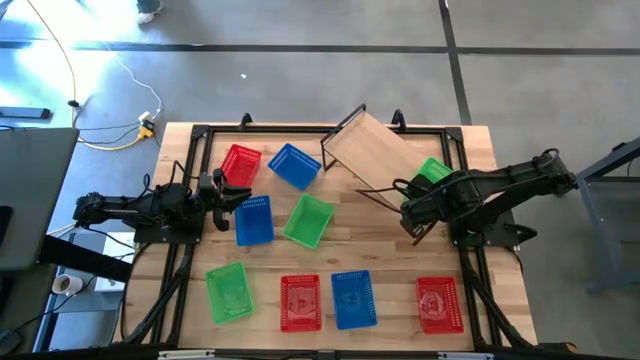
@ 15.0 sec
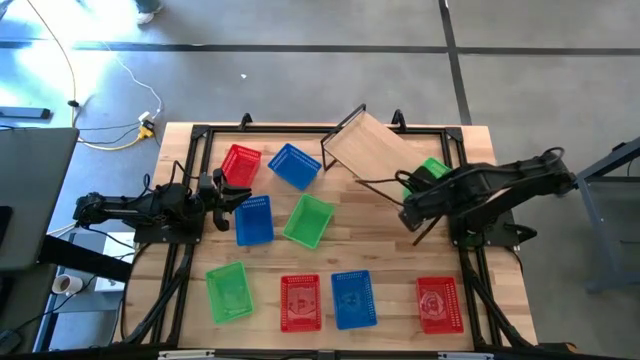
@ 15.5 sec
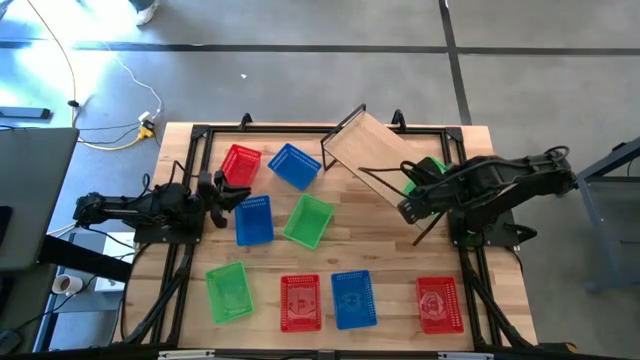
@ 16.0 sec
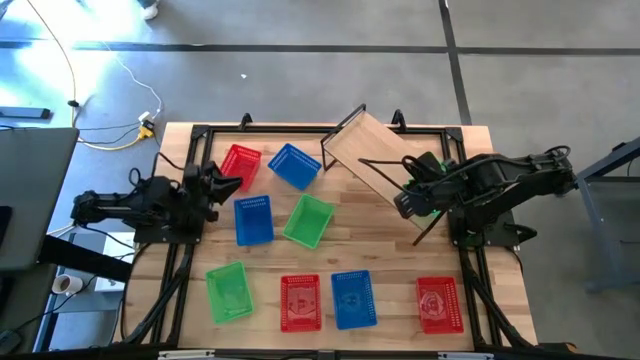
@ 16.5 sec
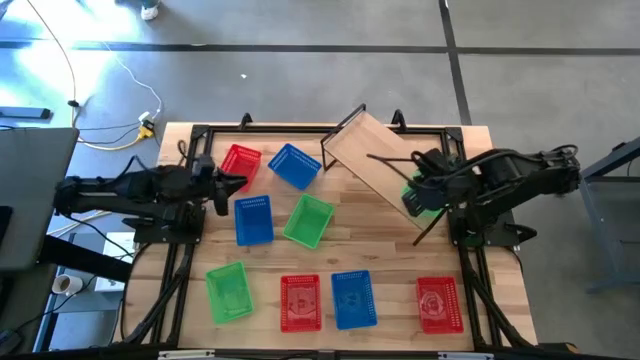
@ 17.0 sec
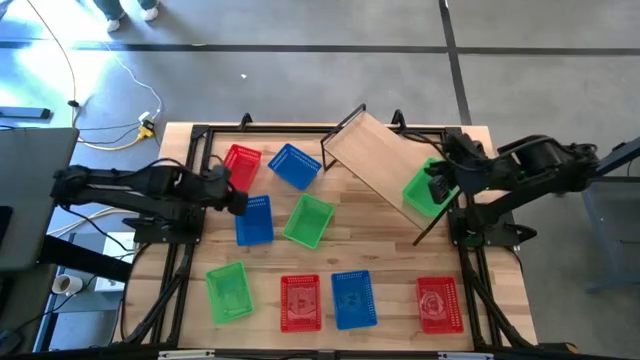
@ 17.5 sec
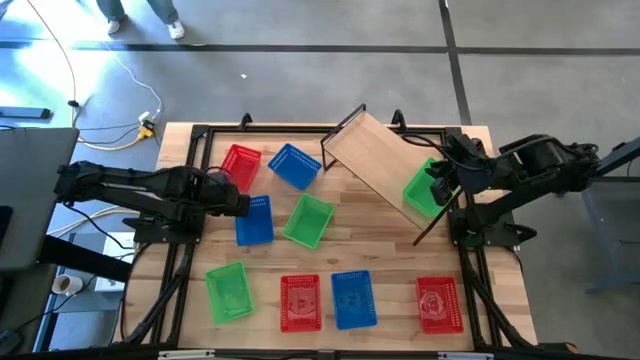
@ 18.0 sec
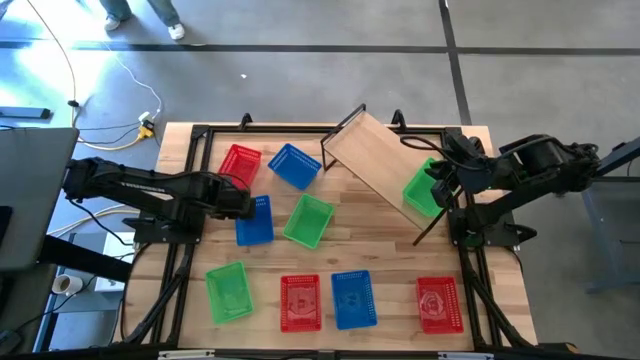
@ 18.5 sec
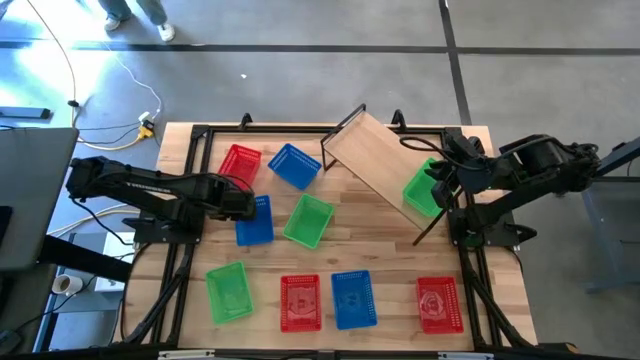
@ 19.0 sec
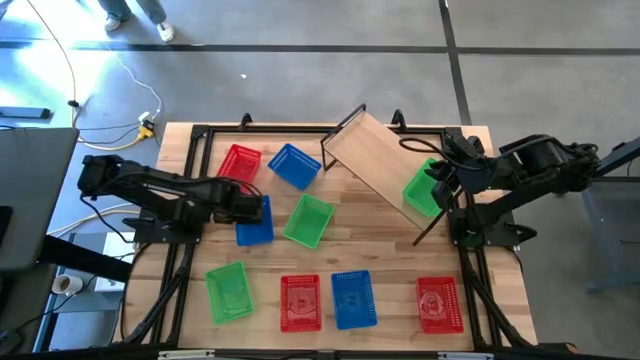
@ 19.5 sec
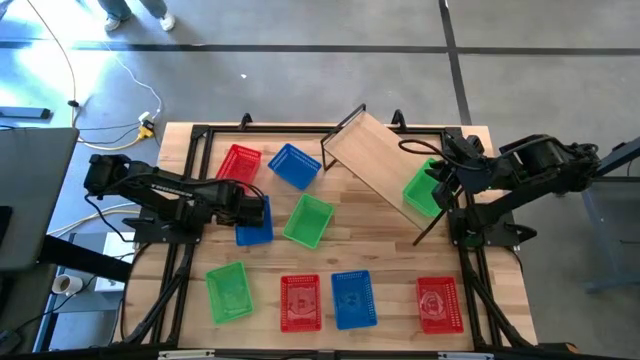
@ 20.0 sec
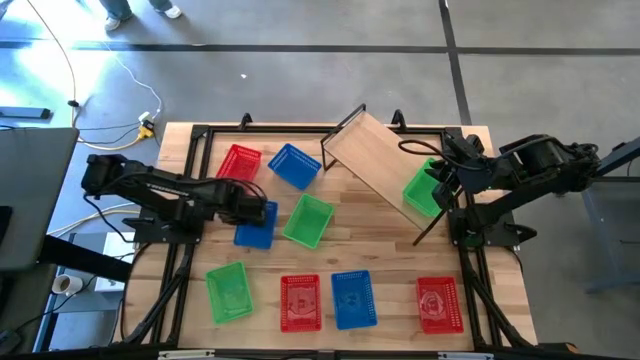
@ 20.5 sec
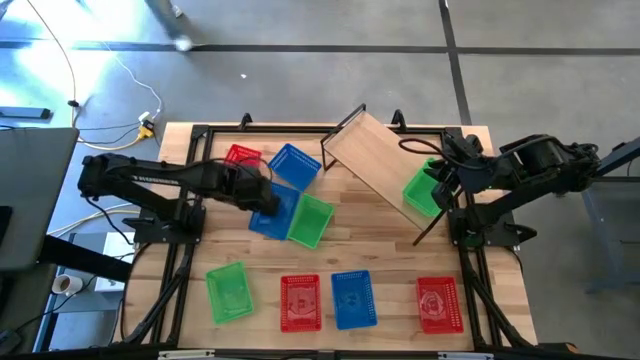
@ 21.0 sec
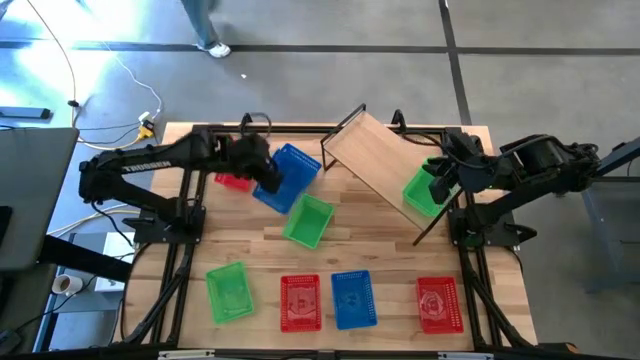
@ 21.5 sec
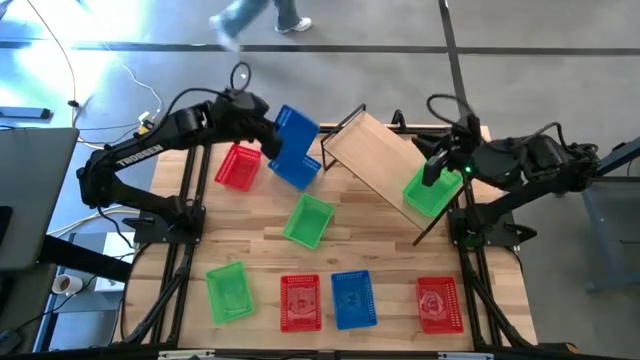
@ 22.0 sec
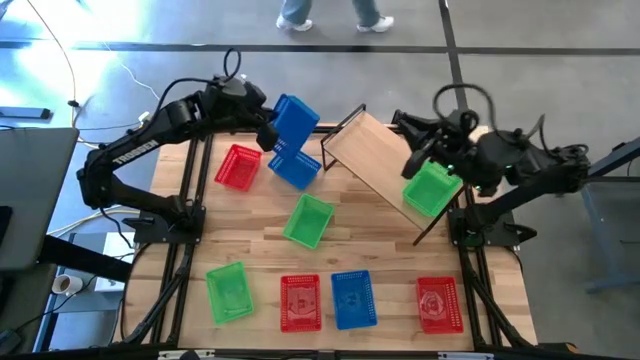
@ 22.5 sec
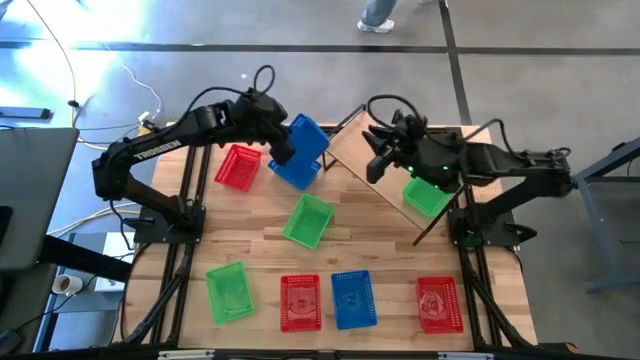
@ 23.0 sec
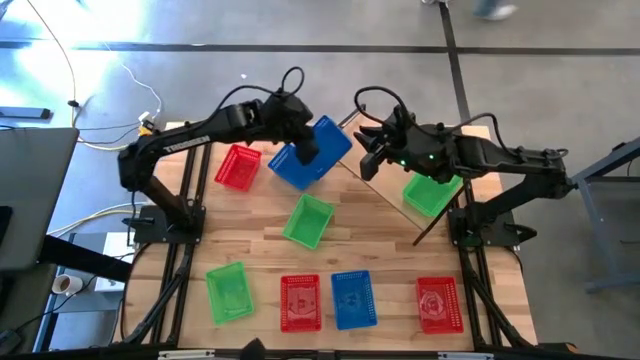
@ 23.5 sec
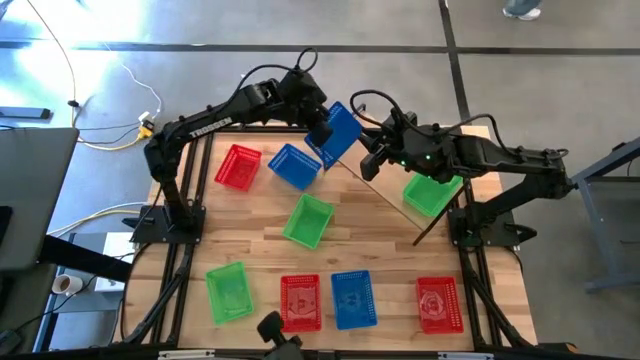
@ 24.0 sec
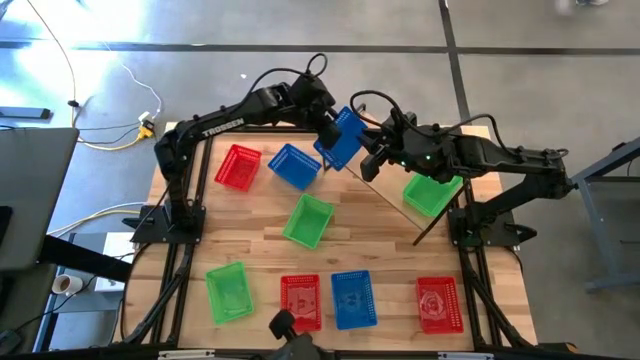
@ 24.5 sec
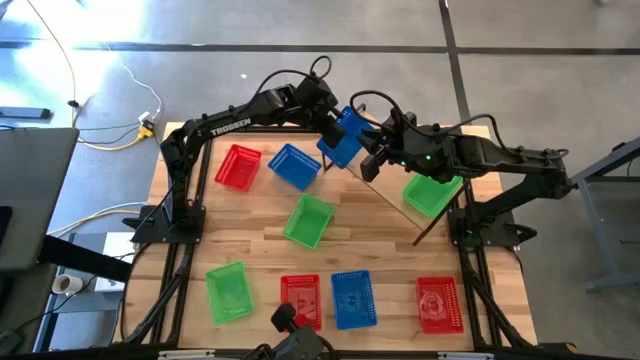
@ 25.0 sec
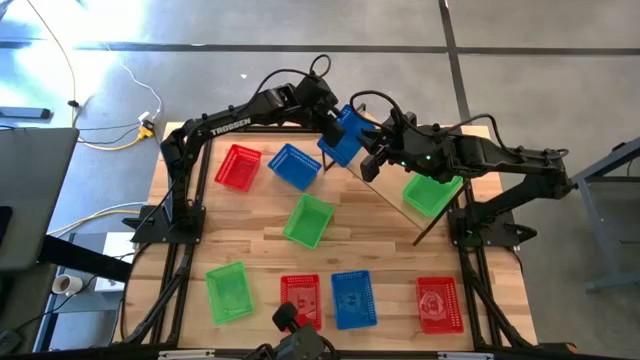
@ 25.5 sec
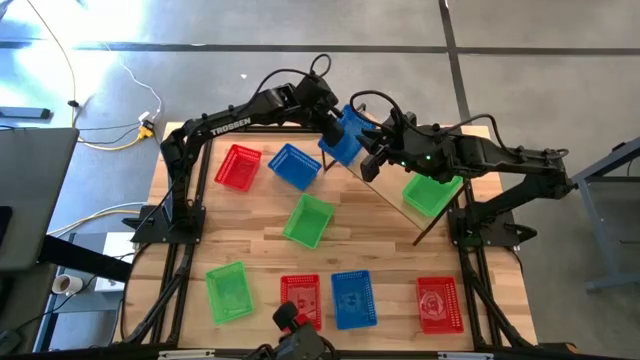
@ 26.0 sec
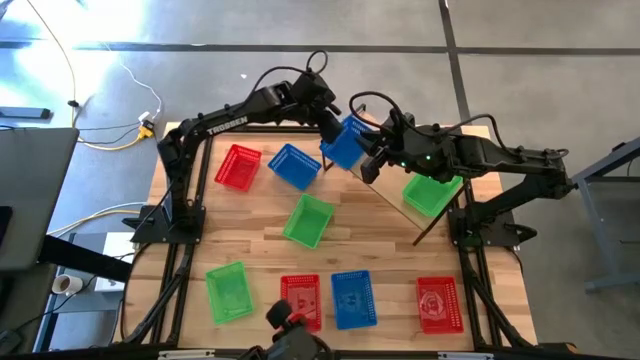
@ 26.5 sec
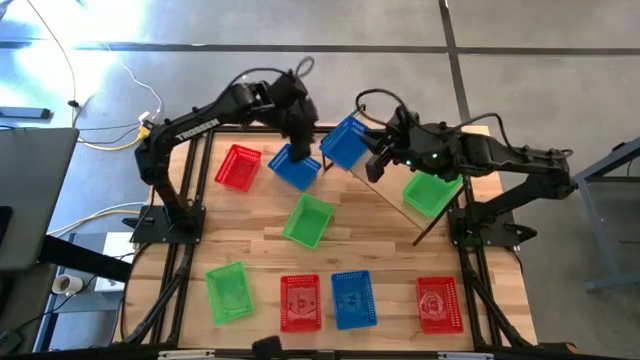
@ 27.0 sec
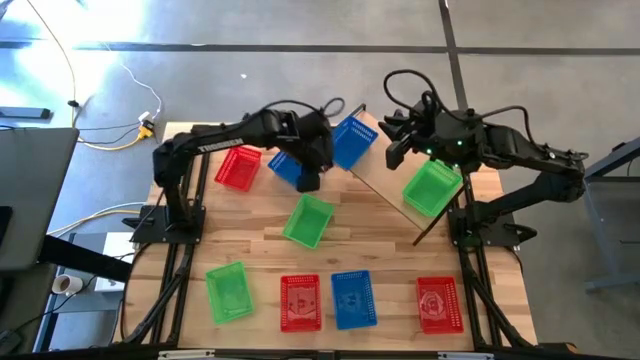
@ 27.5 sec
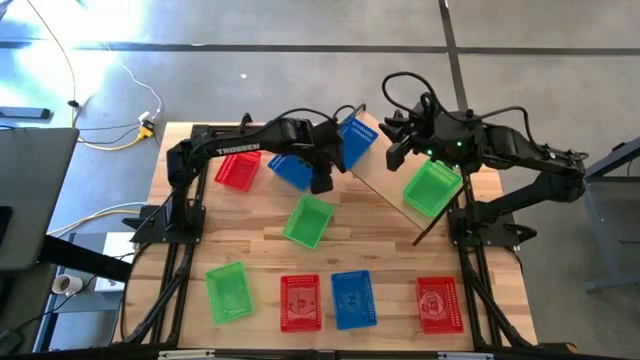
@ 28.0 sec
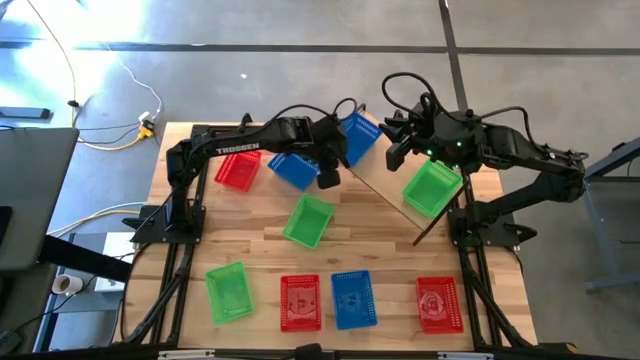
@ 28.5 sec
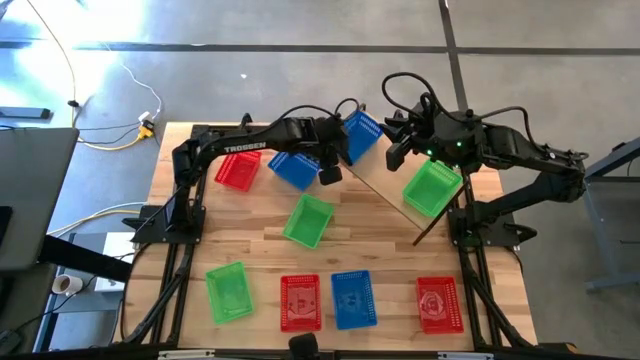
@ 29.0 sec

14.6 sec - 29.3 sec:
Task: Stack baskets on shelf by color
Put the middle blue basket on the shelf

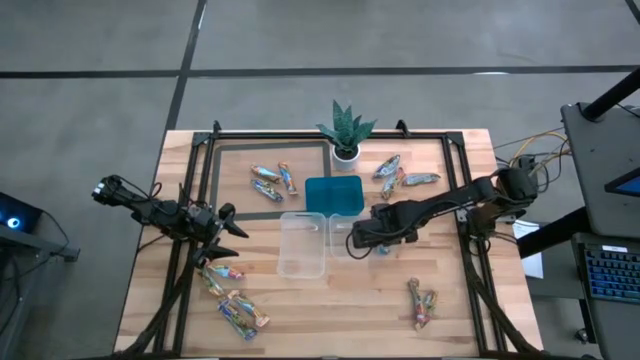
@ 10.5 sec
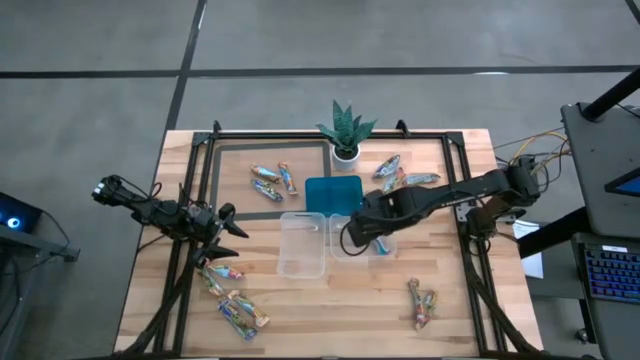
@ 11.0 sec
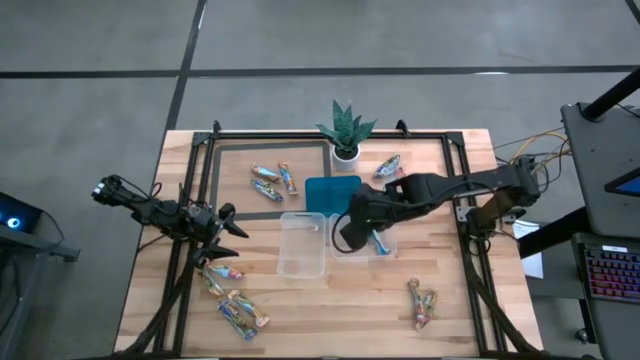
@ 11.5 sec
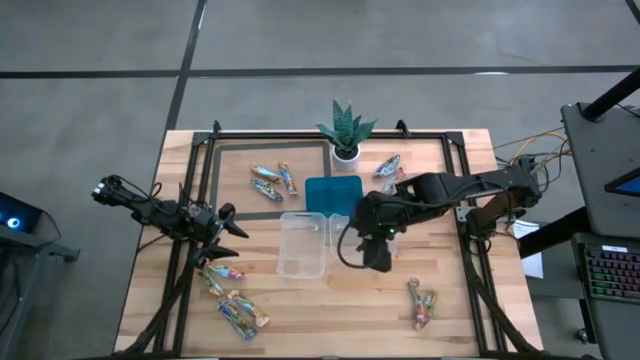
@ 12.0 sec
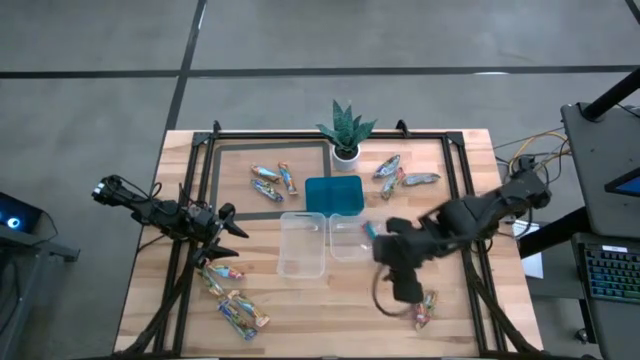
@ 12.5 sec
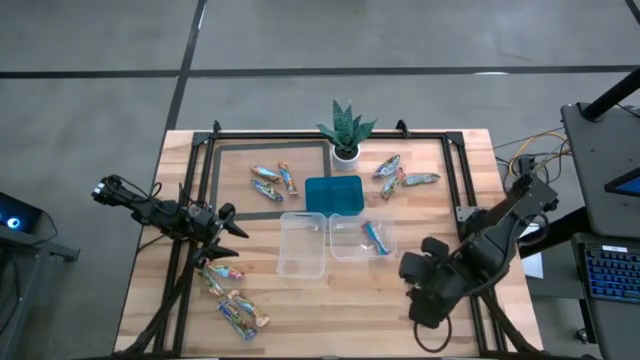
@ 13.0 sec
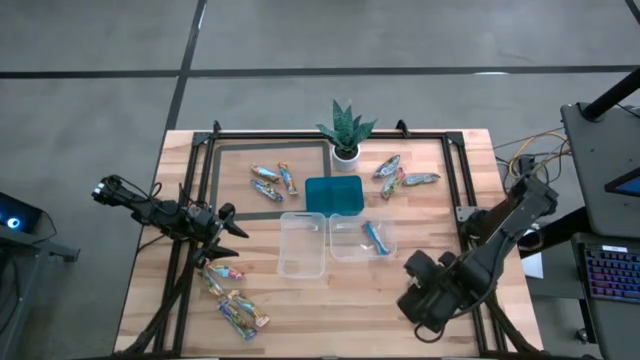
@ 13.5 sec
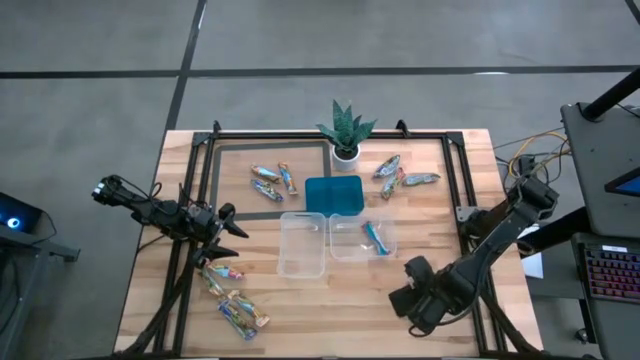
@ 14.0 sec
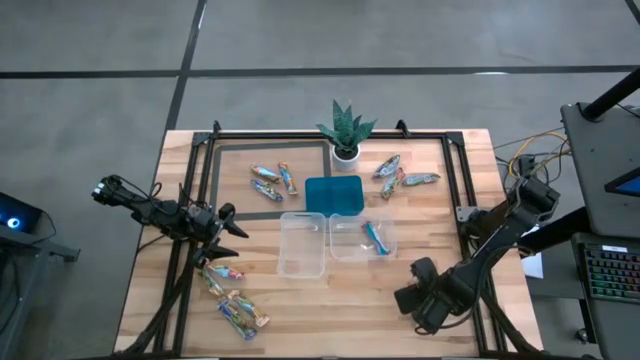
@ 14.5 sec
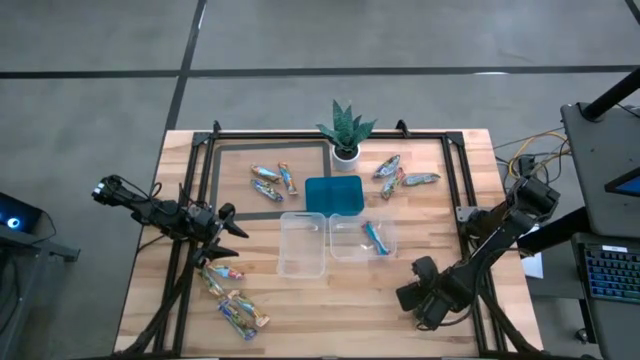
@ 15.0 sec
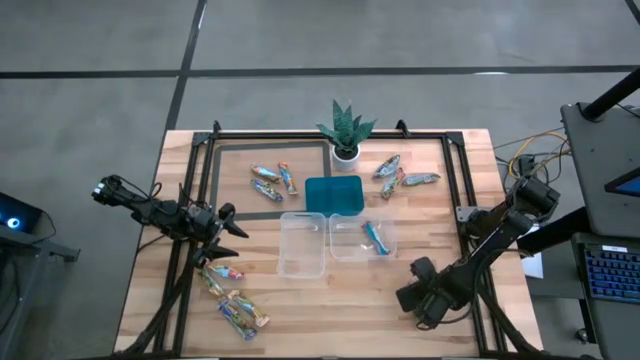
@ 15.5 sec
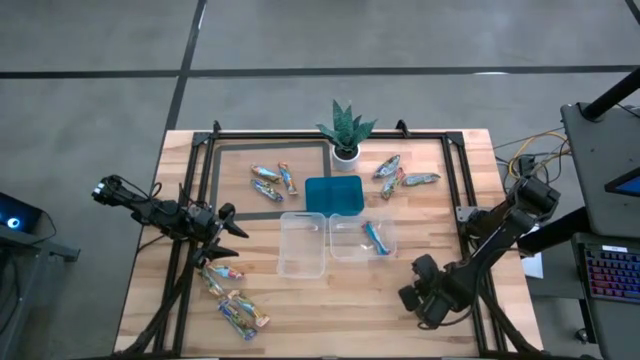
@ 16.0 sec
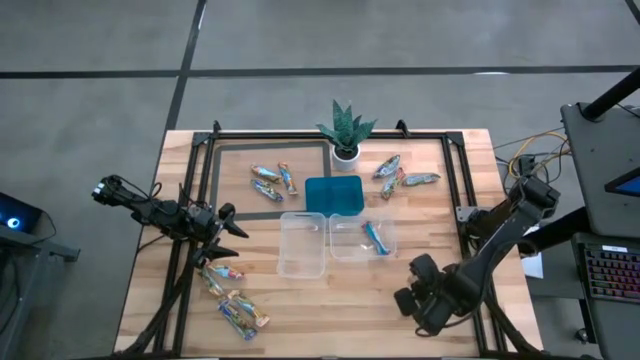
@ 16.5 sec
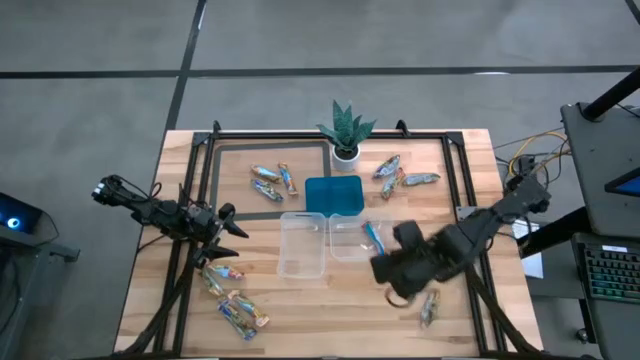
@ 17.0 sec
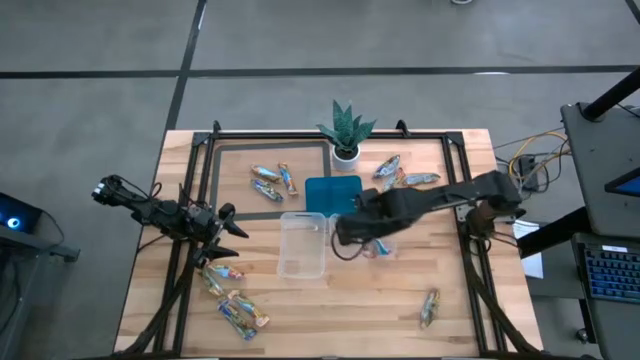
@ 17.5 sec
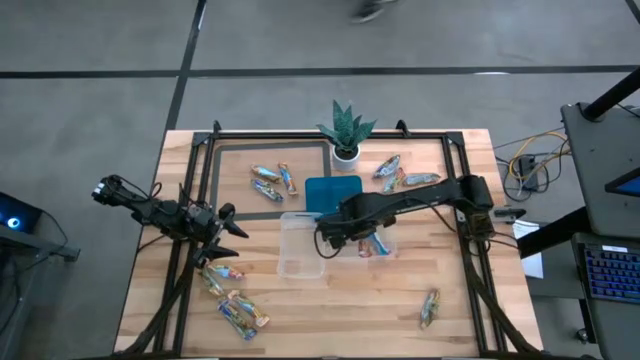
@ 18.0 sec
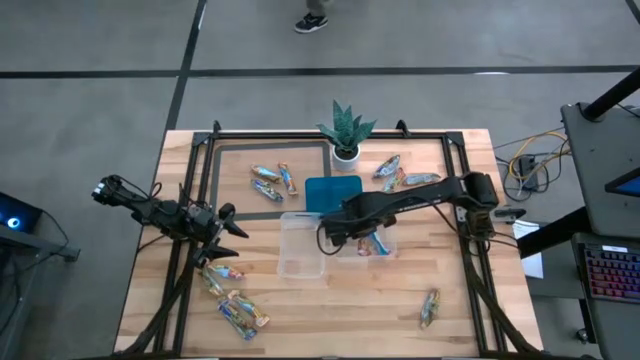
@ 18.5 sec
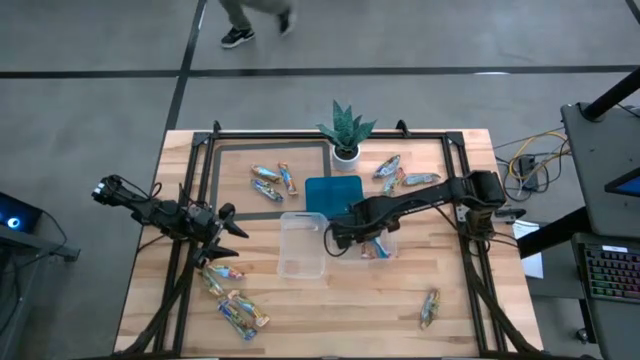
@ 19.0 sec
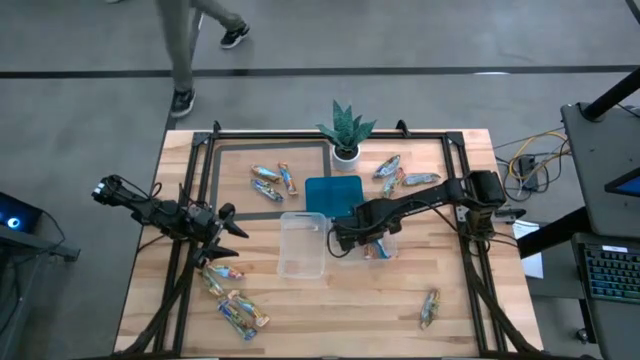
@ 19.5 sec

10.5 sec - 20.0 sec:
Task: Pick and place Granola Bars by type
Put the red granola bar into the right transparent bin
